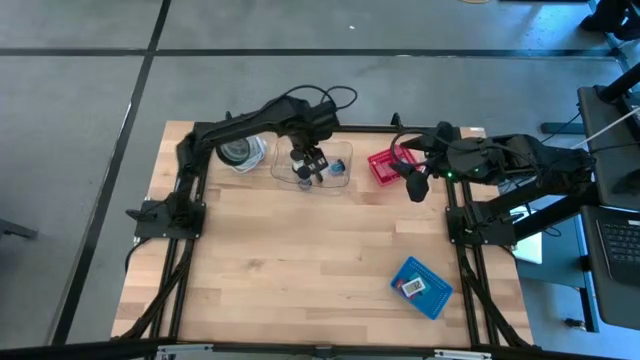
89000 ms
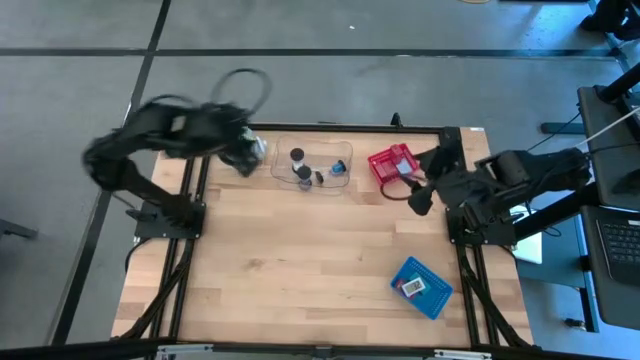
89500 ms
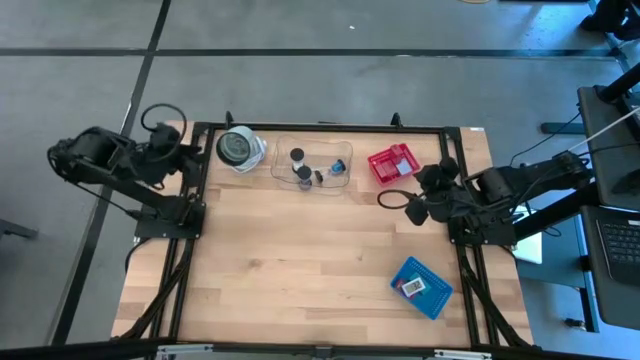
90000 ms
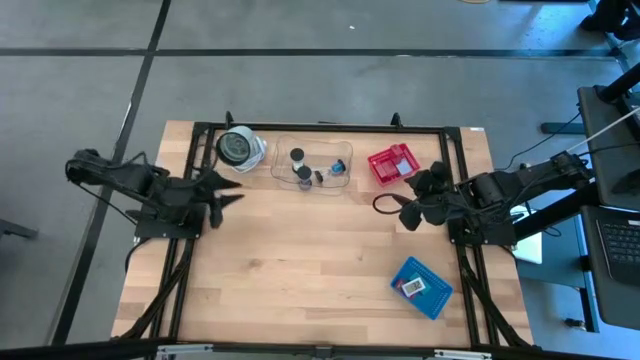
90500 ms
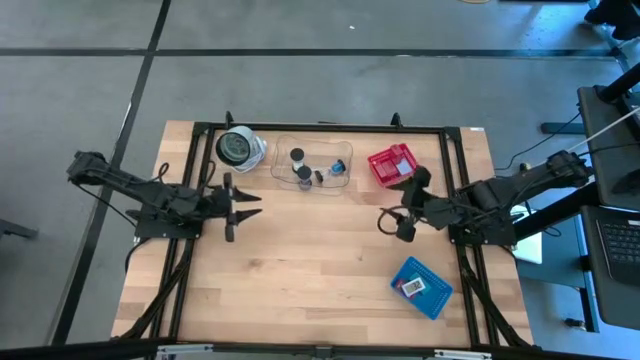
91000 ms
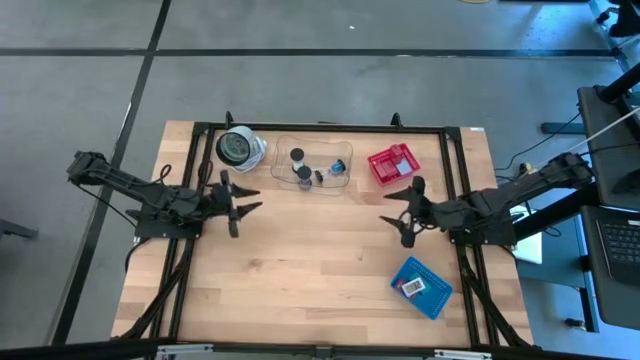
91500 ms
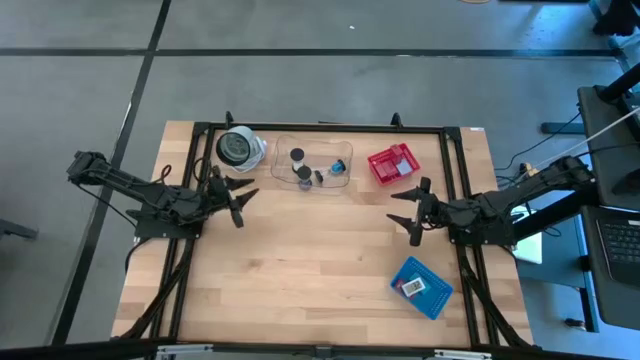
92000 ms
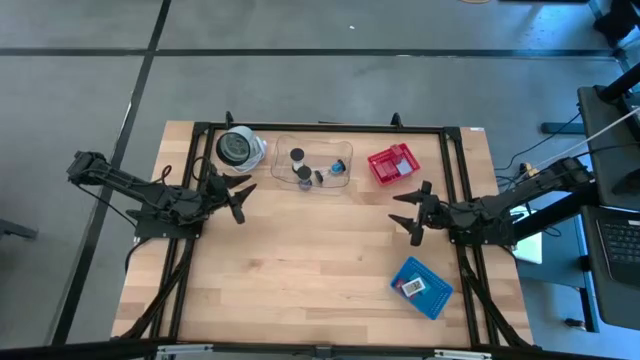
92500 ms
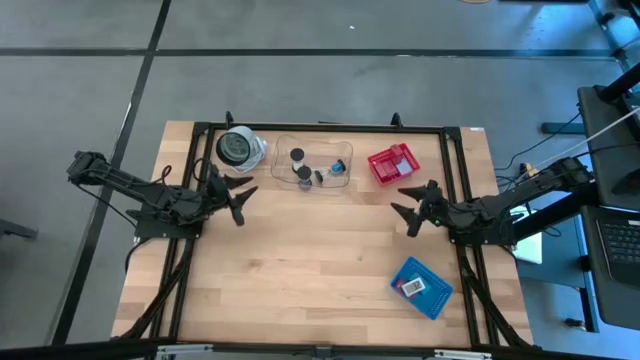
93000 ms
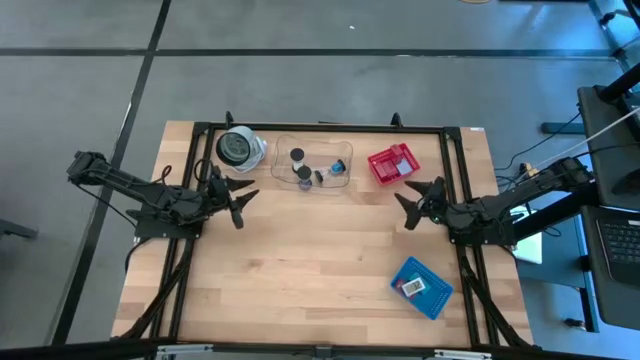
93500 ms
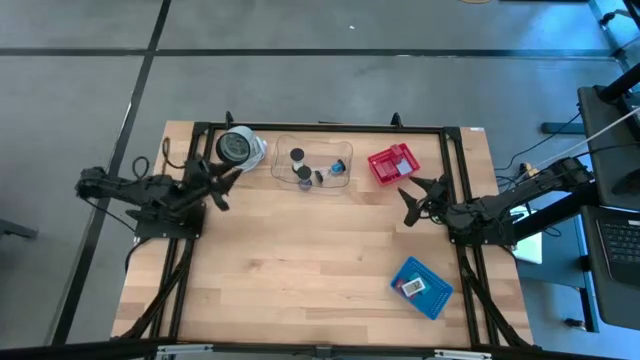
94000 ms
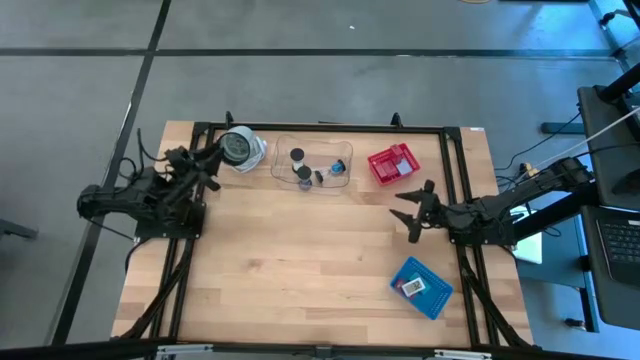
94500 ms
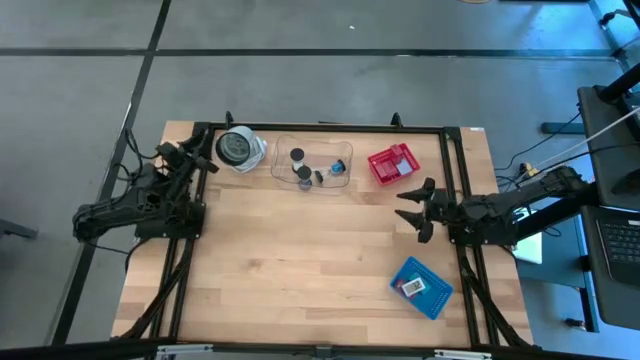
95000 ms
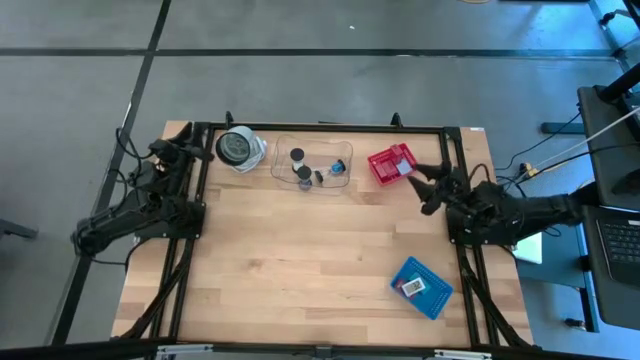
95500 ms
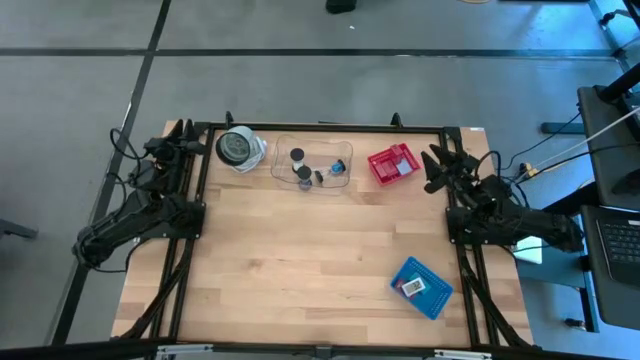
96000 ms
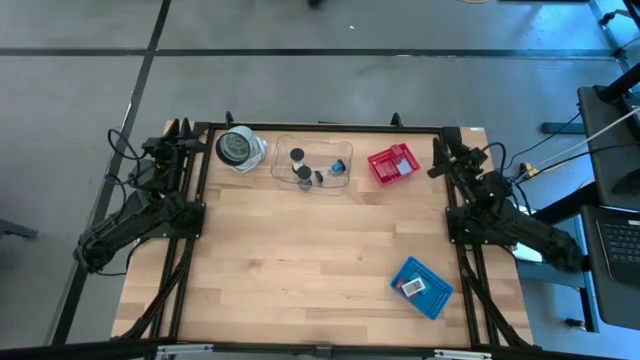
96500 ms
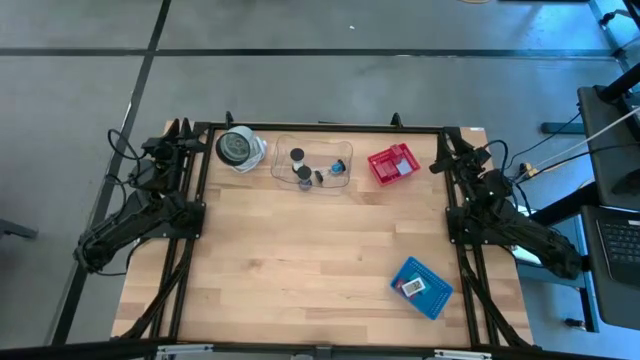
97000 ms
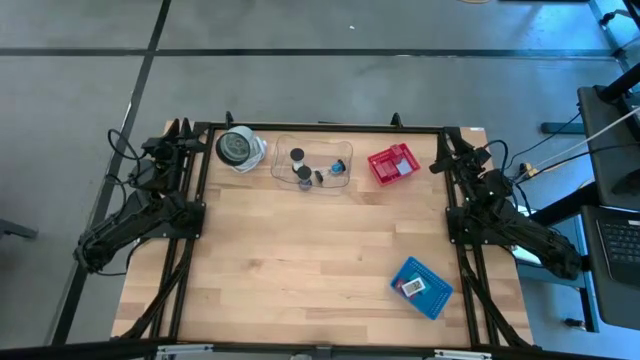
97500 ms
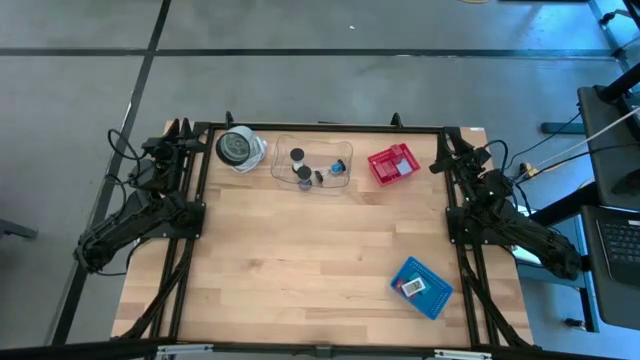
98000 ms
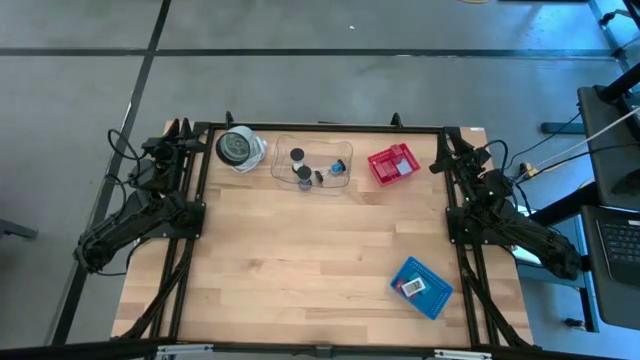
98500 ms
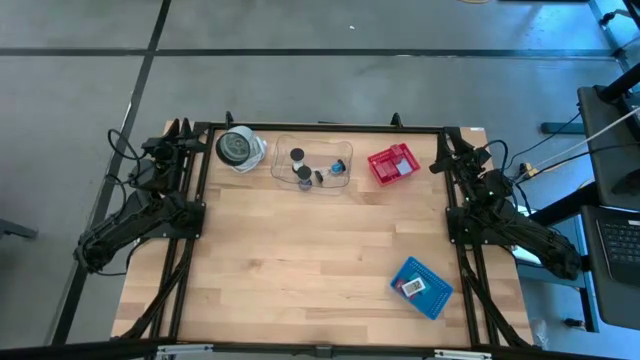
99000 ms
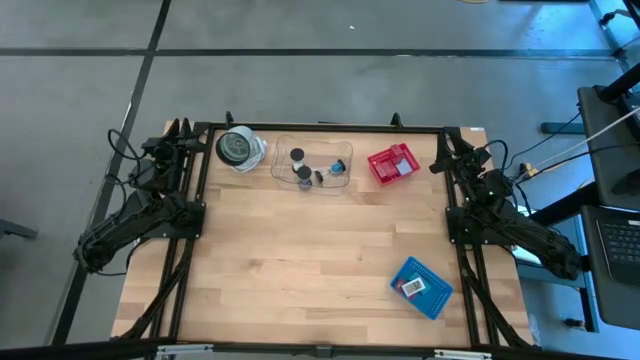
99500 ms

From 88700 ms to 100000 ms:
Task: Pick & Place Office items
Return to Home Position
